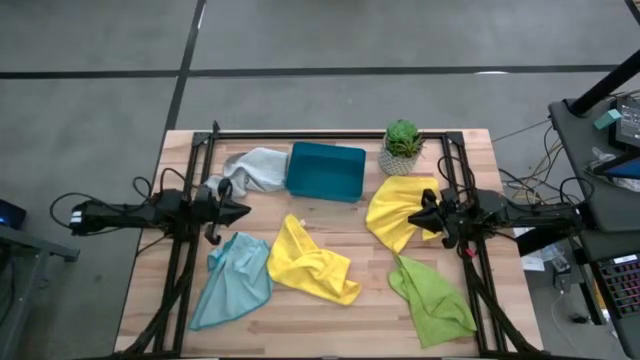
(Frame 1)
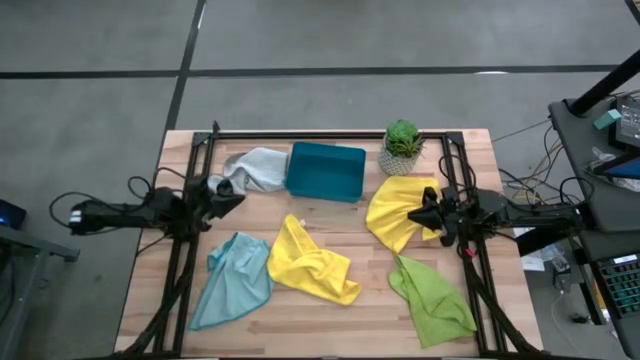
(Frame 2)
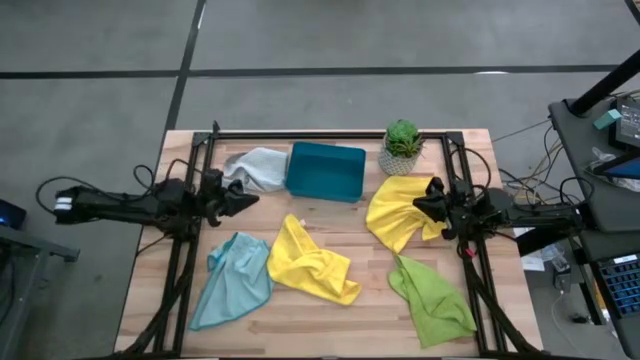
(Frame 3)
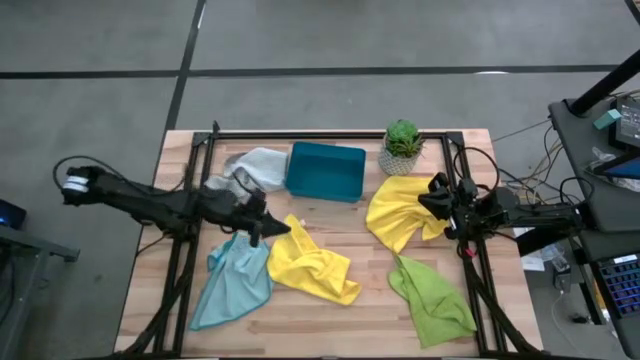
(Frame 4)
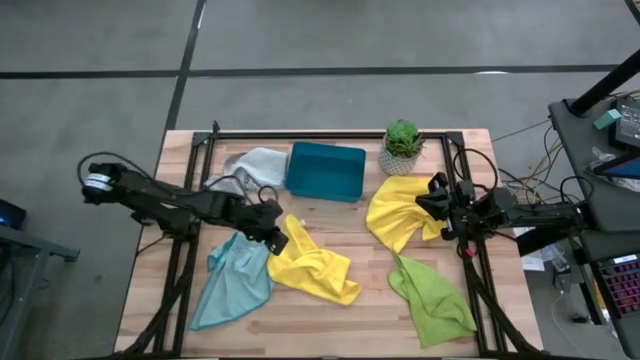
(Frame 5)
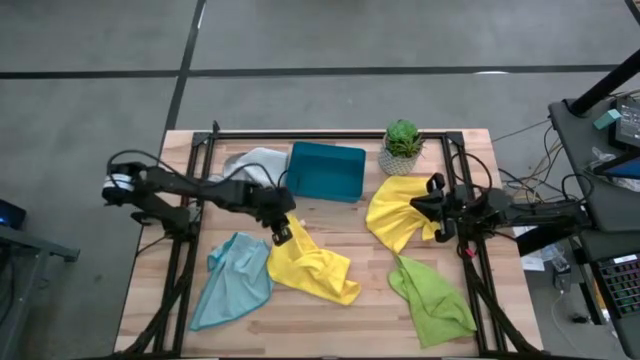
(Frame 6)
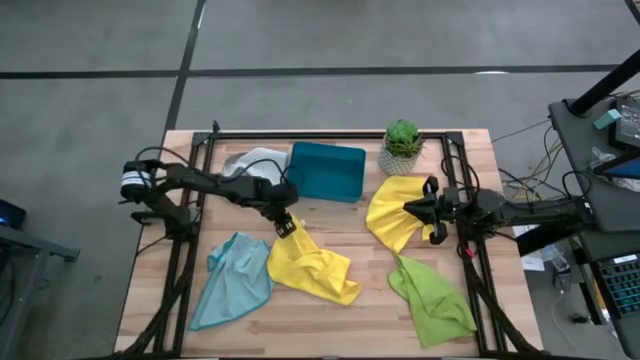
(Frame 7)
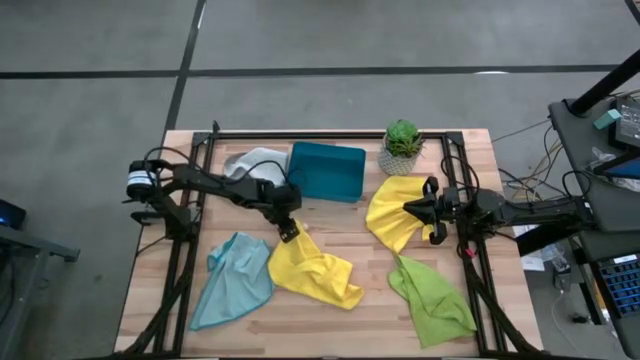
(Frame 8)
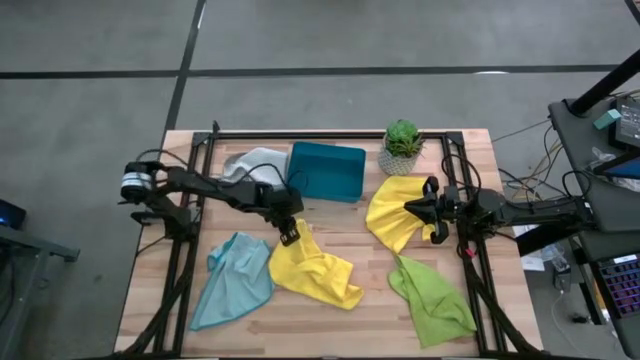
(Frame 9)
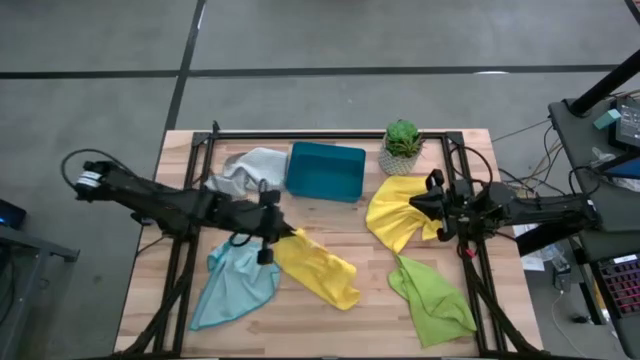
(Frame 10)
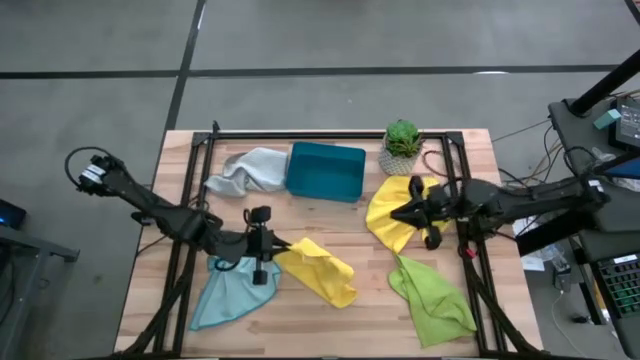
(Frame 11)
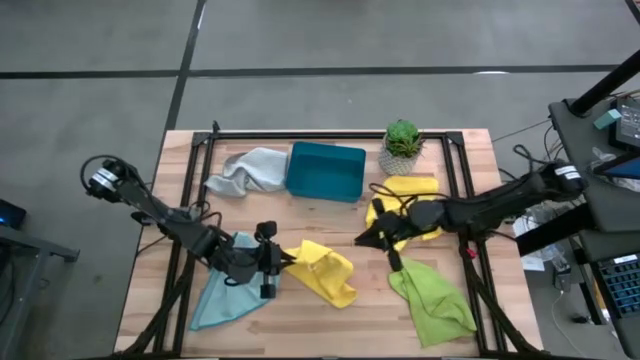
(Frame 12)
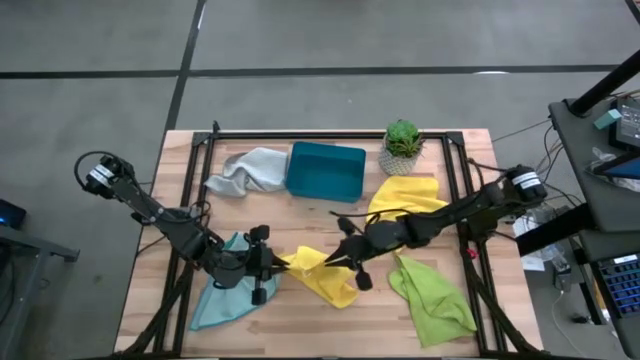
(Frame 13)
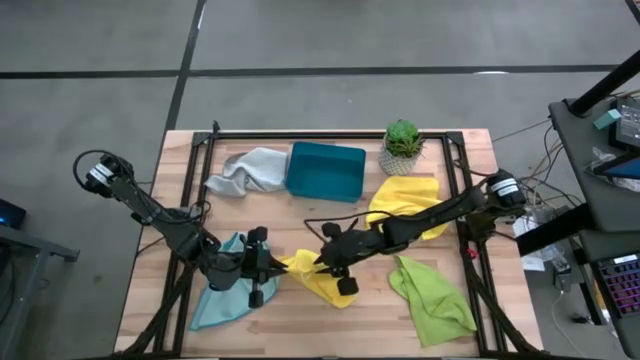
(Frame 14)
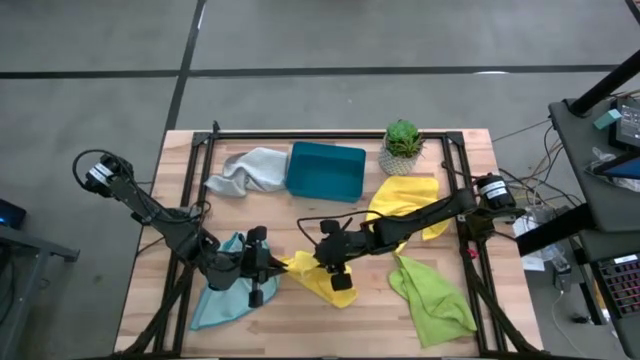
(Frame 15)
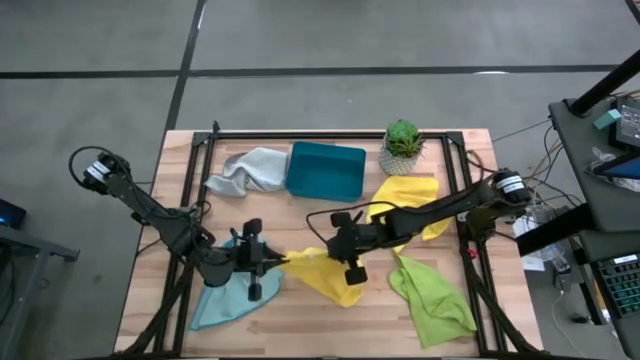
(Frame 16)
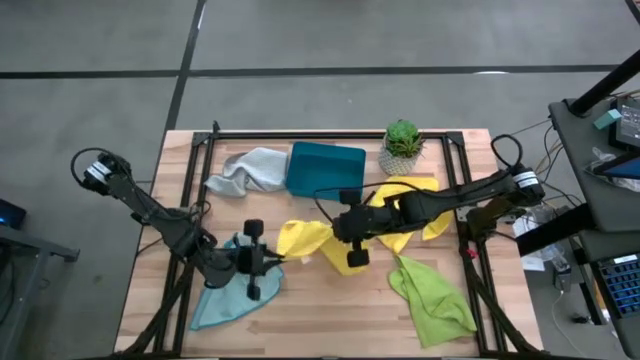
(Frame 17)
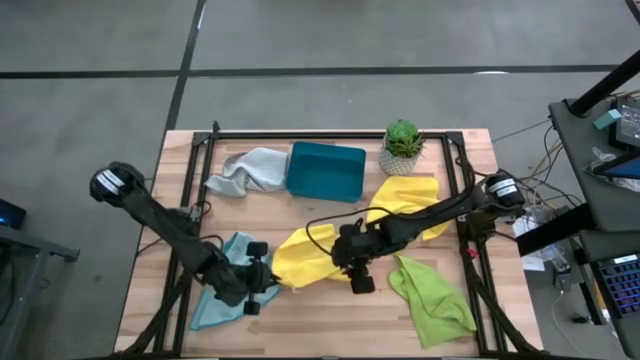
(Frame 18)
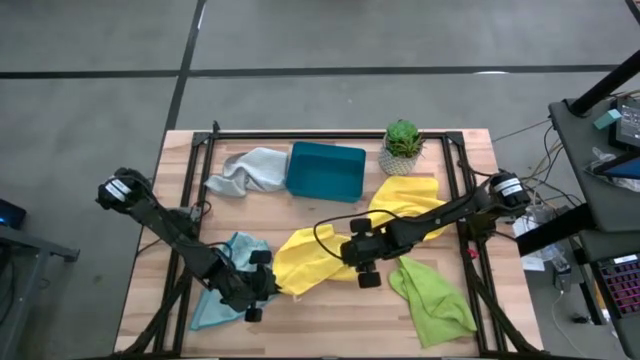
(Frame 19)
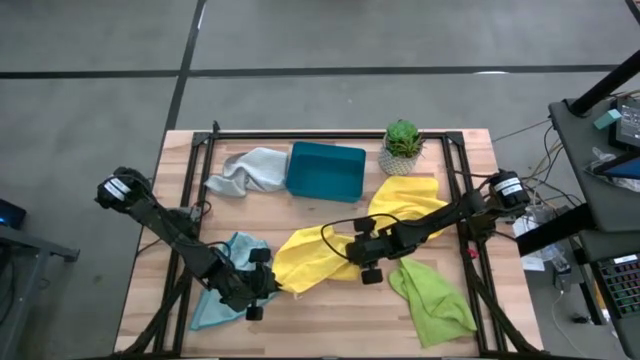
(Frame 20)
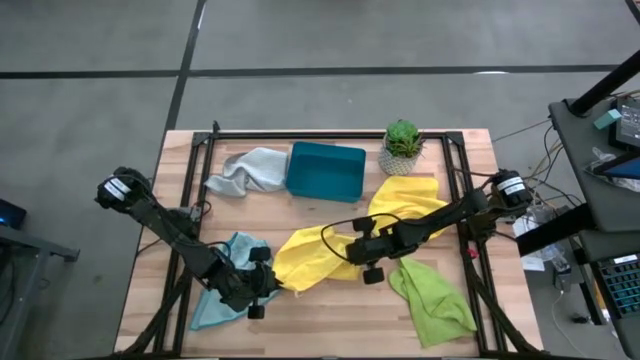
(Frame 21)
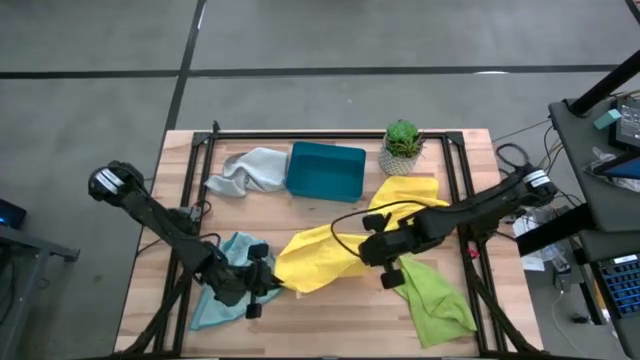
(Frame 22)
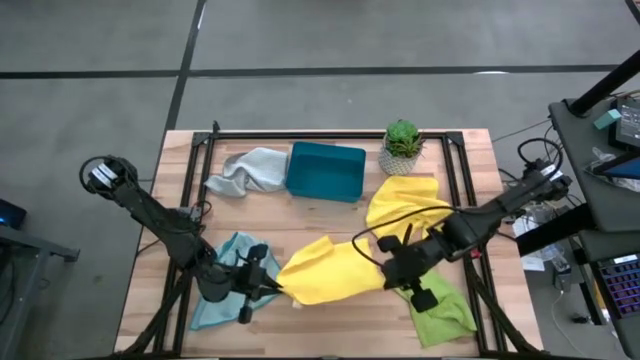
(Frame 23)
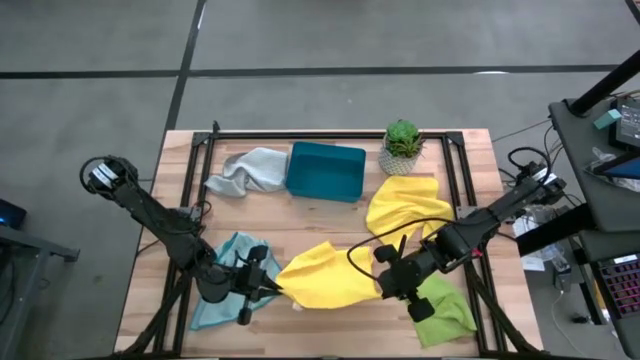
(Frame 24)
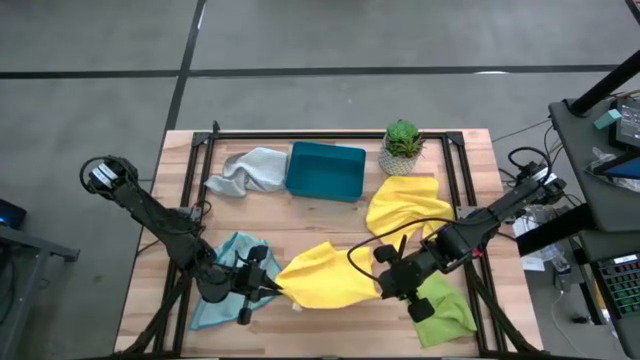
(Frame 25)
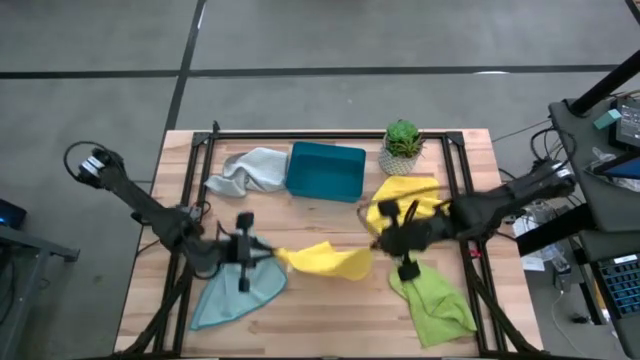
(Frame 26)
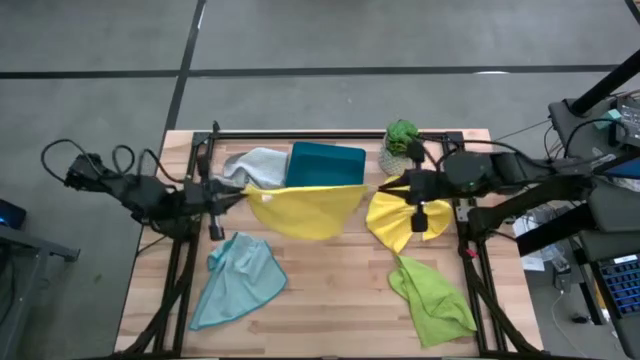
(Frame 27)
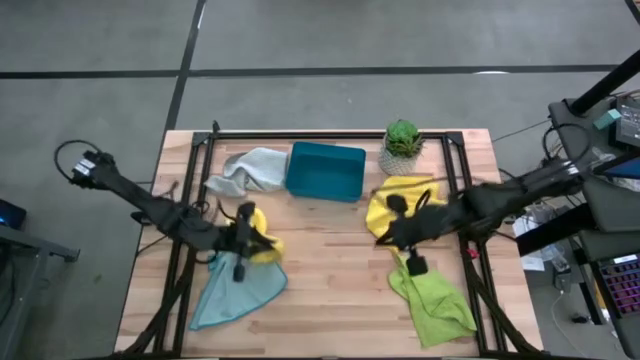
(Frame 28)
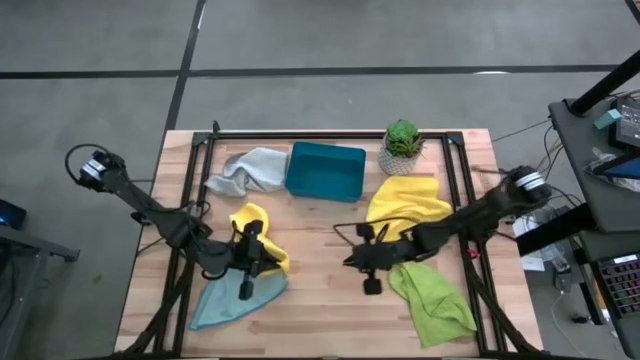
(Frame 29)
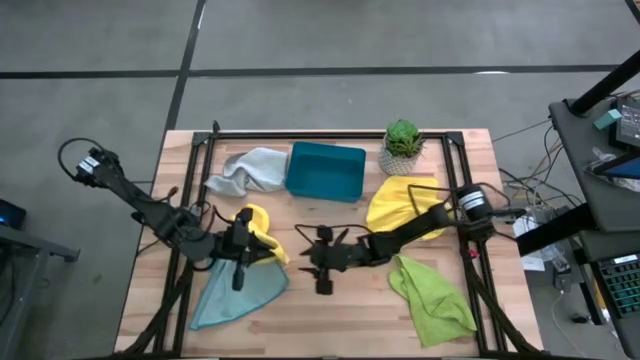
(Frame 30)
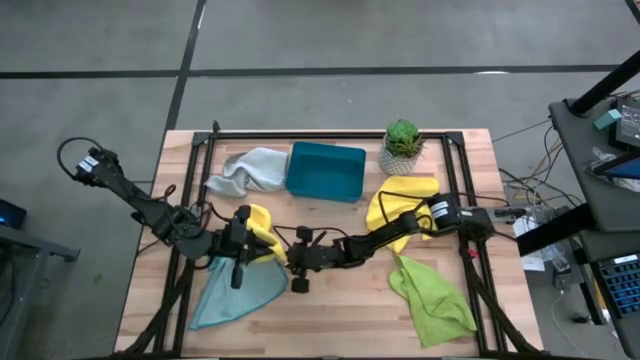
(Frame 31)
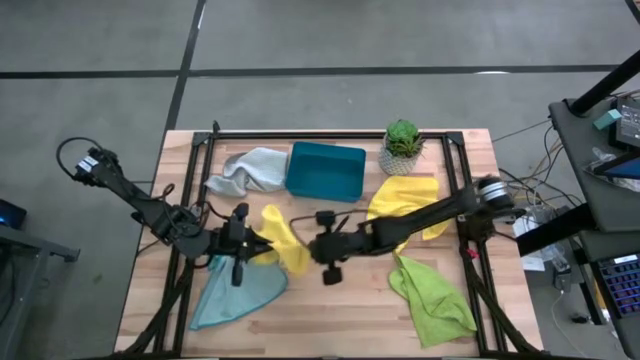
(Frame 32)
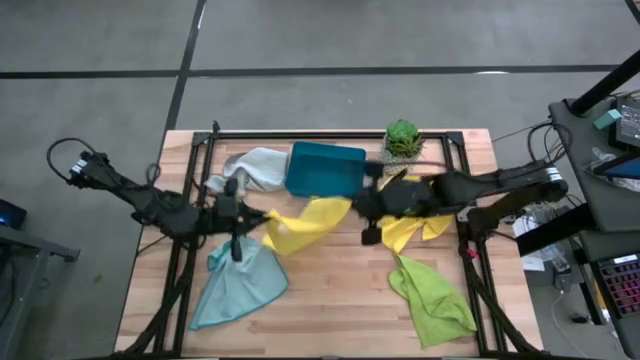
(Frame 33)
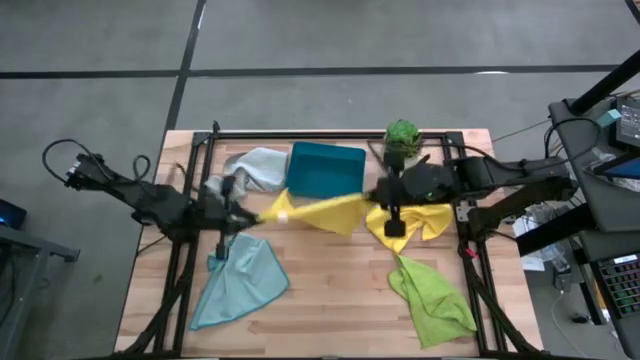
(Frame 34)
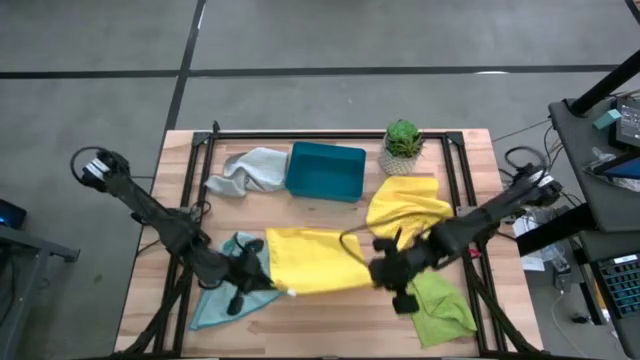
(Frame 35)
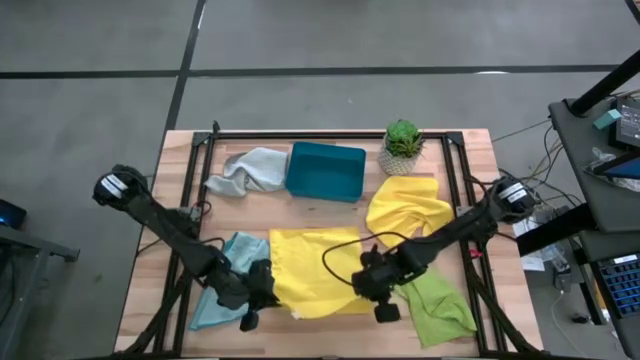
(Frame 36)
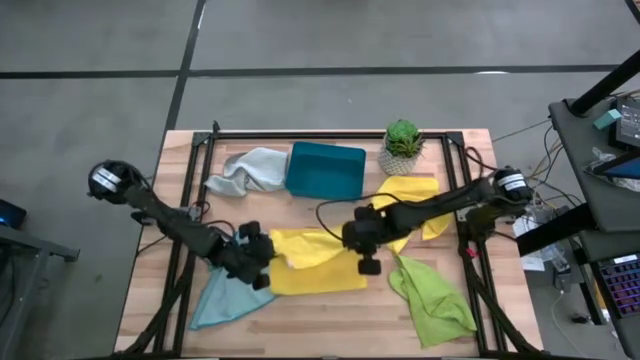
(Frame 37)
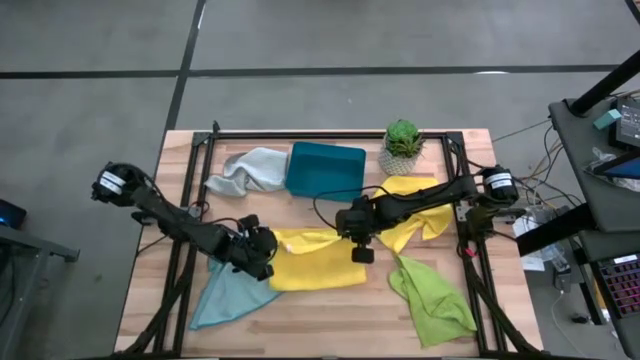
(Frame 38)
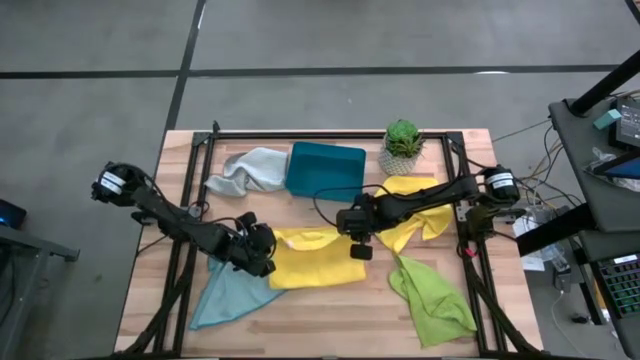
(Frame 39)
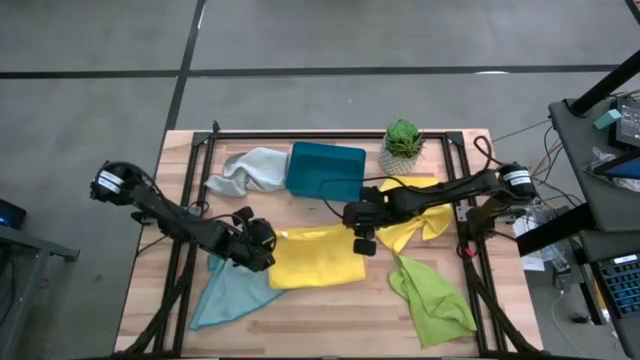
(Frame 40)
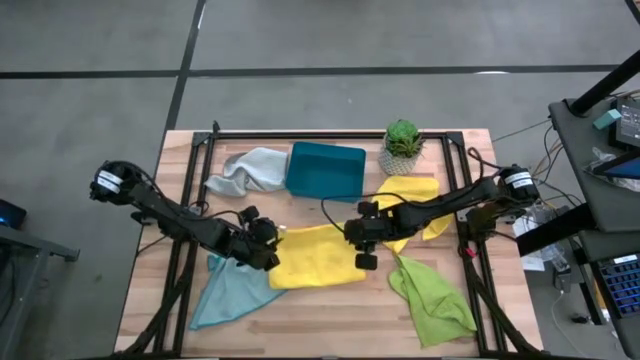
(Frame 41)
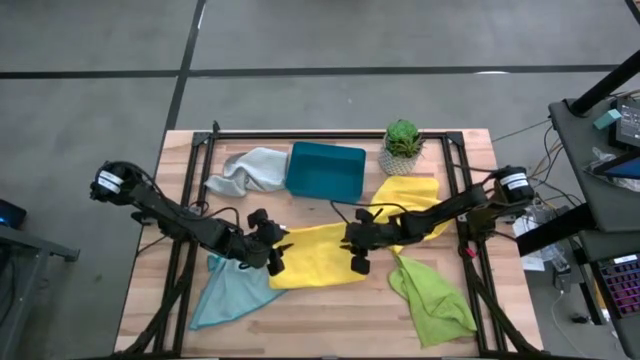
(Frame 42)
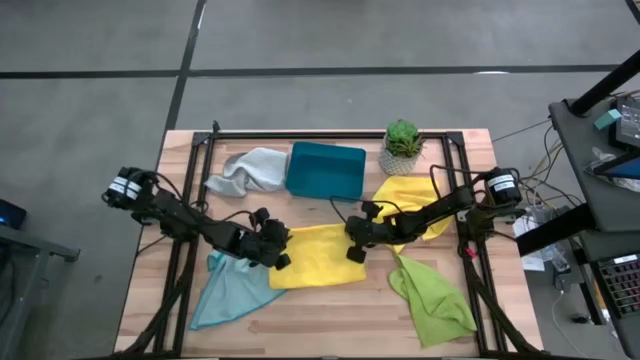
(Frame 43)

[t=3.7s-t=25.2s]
Task: Fold microfiber towels
Fold the left yellow microfiber cloth
